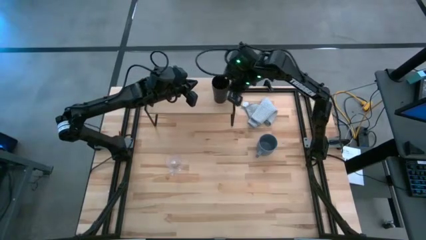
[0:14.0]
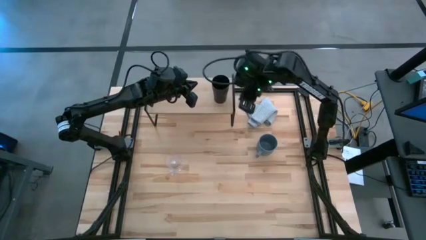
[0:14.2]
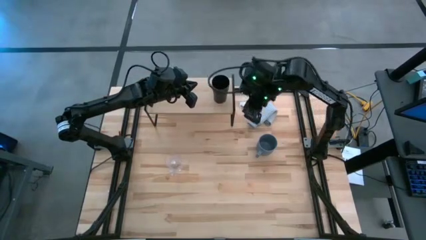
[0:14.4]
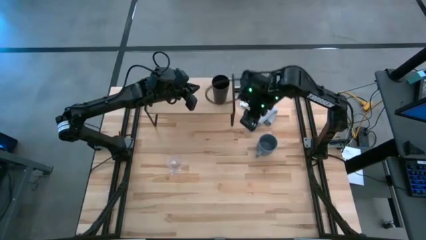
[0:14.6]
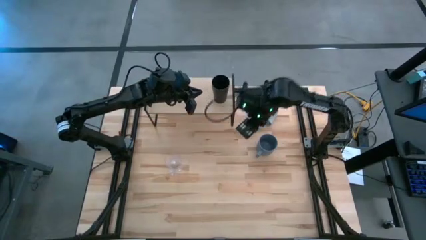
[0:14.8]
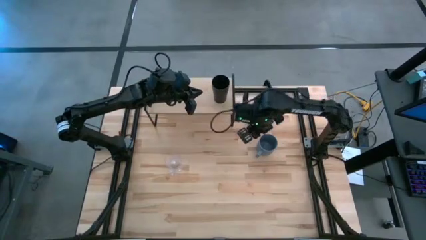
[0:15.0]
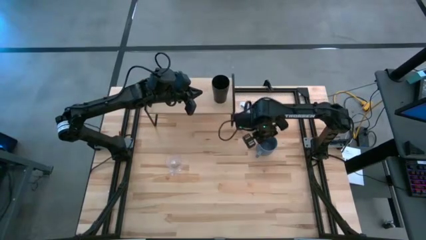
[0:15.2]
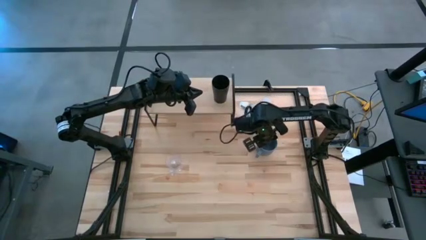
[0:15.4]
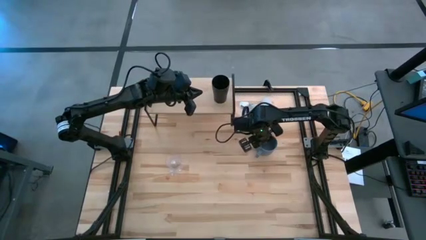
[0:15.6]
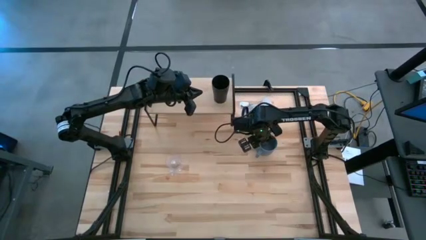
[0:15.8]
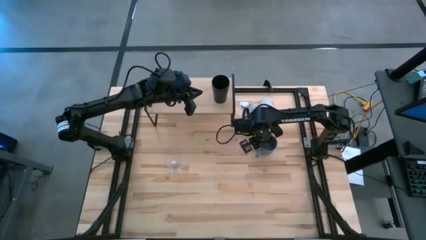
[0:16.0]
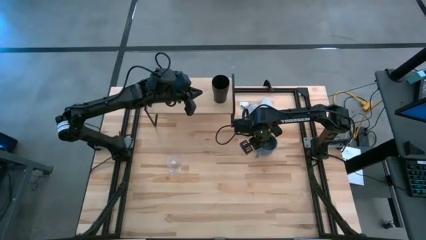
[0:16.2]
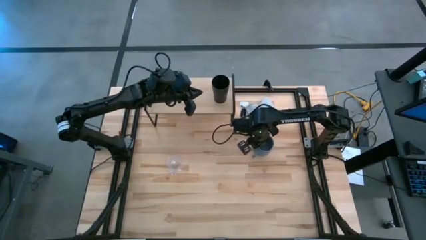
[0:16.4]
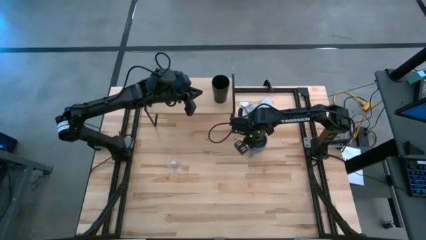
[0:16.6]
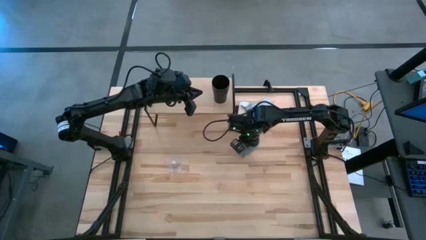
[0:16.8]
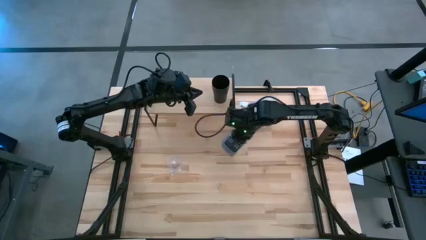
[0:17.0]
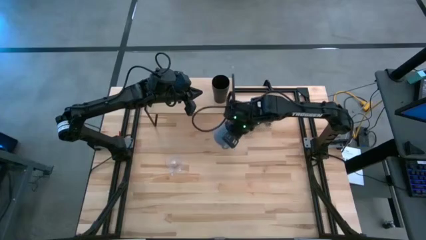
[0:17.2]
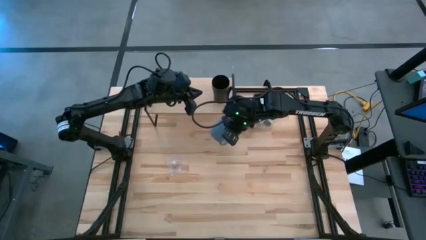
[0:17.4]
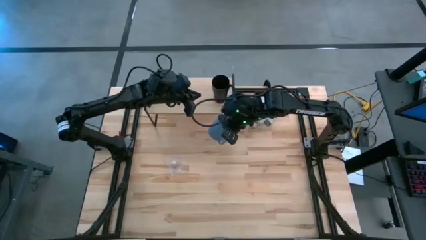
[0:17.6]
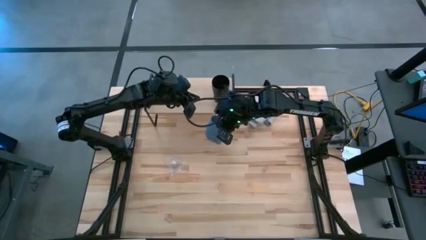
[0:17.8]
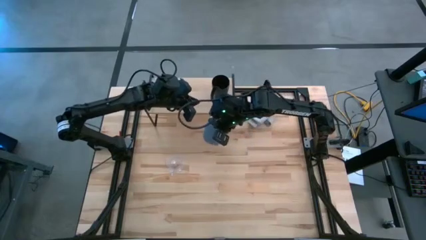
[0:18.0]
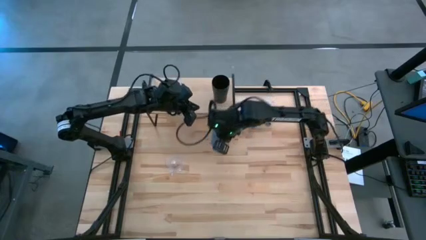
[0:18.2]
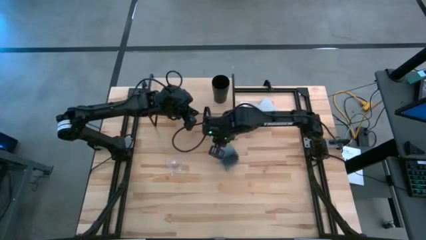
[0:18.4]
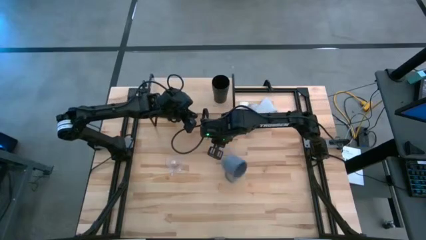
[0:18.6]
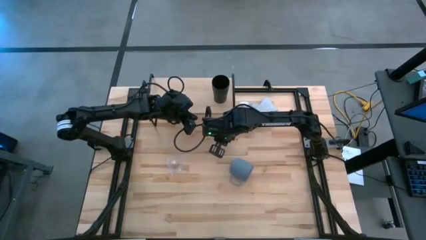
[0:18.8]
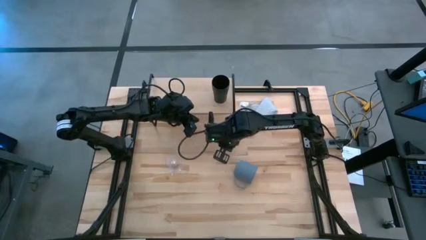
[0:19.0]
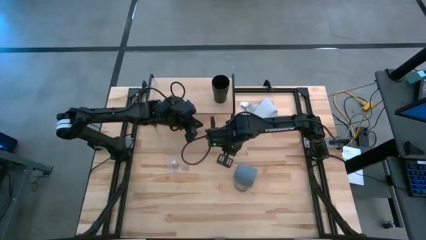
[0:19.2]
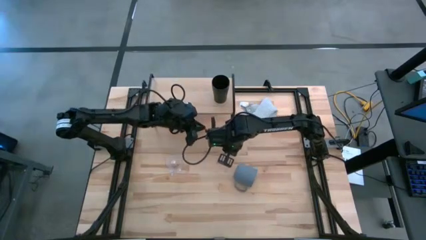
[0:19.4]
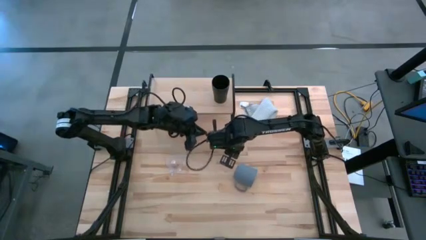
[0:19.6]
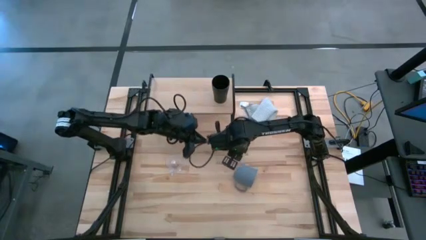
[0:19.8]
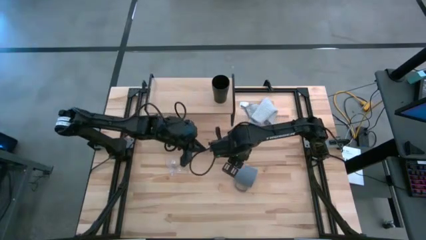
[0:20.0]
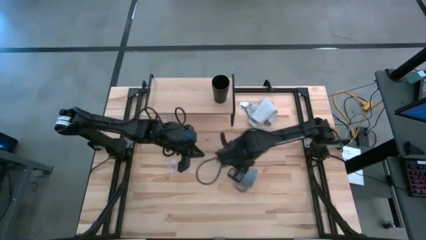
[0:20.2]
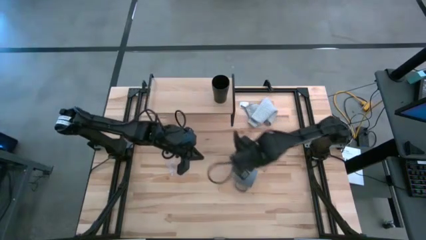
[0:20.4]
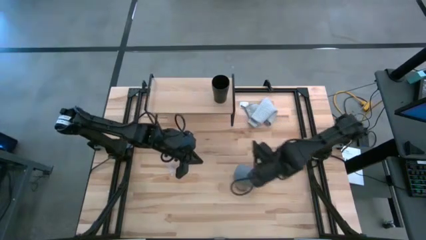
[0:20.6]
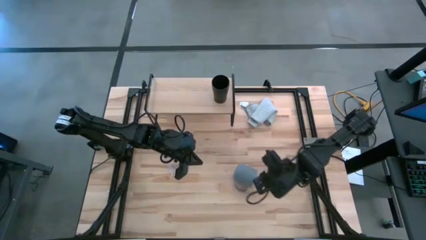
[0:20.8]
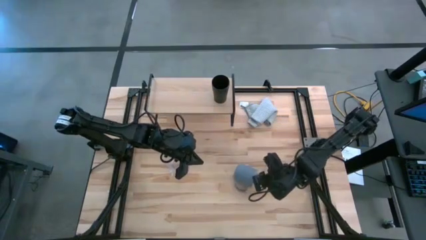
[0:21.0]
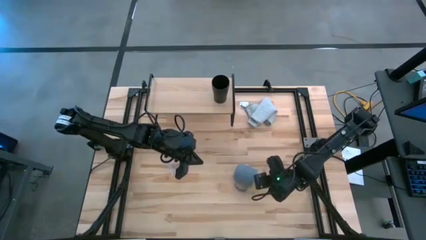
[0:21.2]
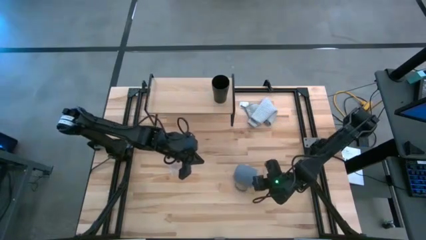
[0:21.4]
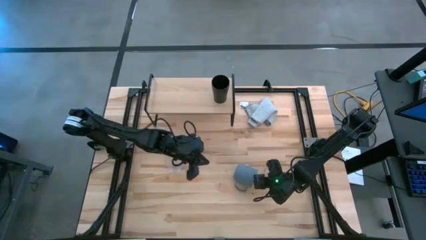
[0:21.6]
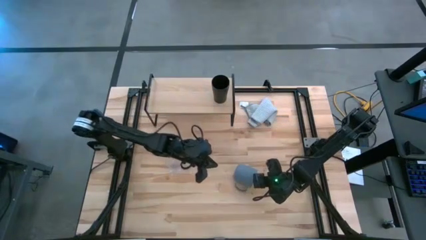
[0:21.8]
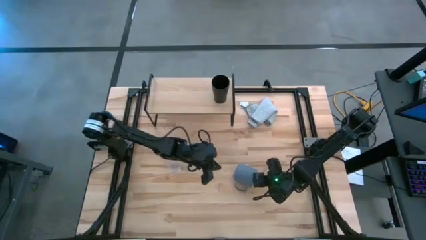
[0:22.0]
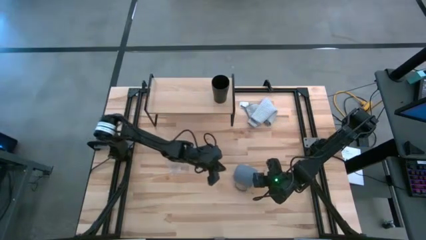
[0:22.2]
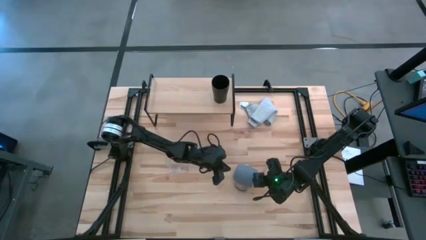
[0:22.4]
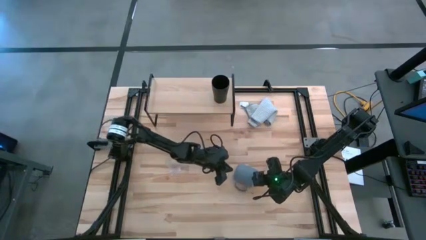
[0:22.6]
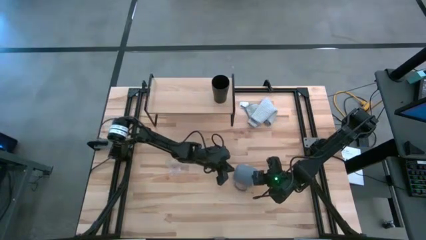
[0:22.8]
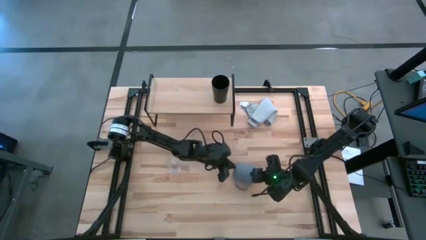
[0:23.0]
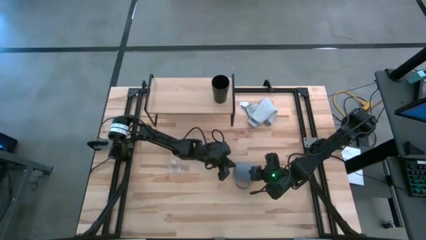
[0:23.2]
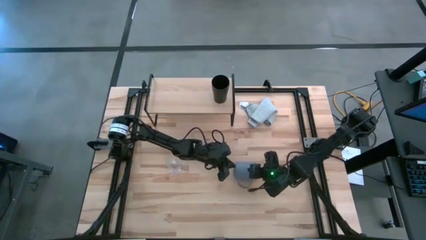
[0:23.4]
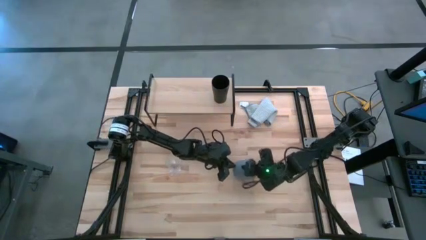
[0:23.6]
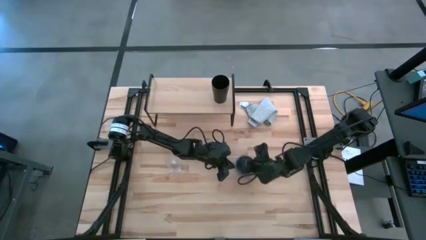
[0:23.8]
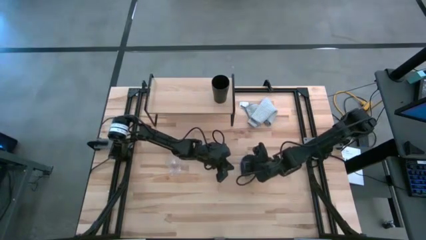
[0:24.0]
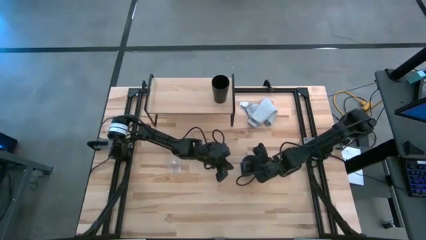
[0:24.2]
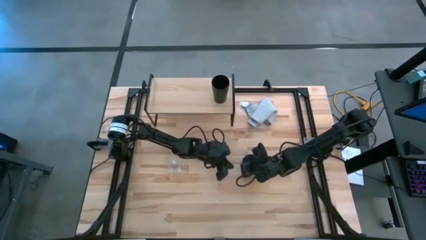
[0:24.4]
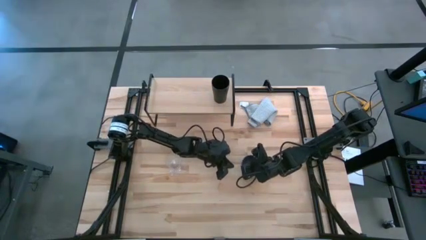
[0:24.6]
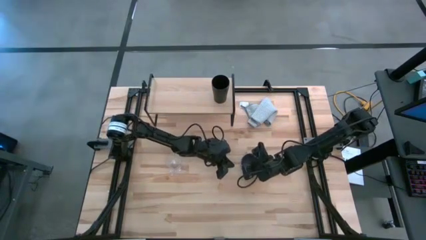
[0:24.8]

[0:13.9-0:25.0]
Task: Stack small to large cups/mugs on shelf
Put the blue mug on the shelf

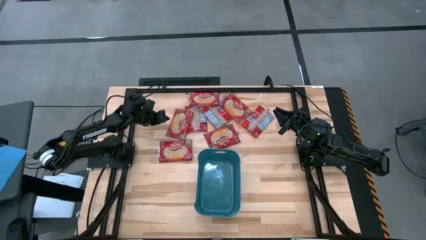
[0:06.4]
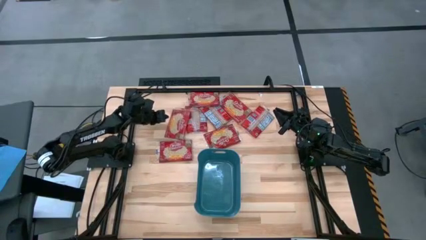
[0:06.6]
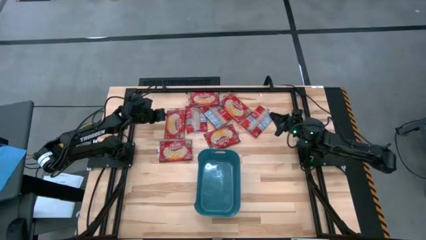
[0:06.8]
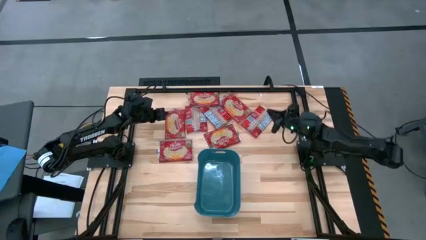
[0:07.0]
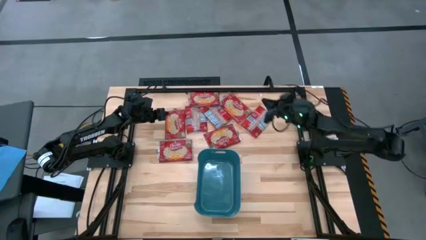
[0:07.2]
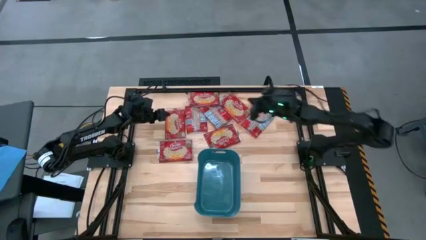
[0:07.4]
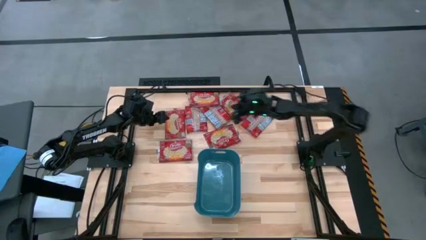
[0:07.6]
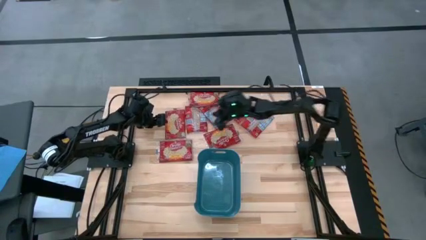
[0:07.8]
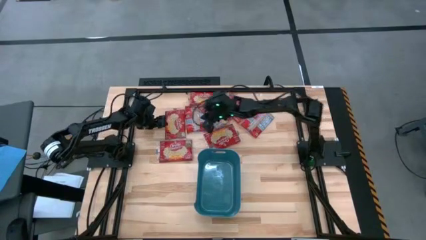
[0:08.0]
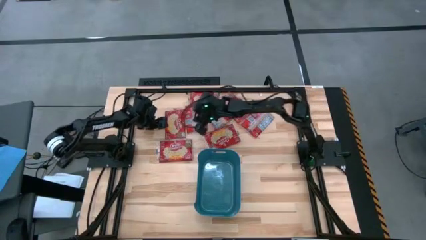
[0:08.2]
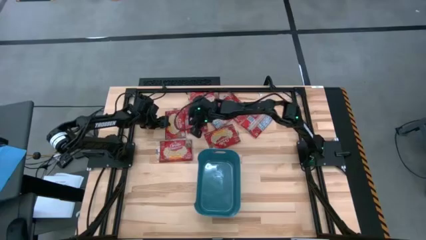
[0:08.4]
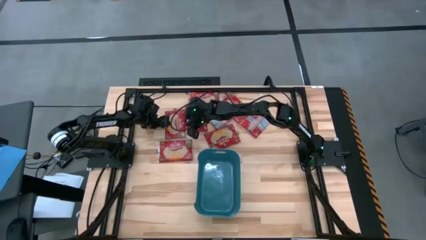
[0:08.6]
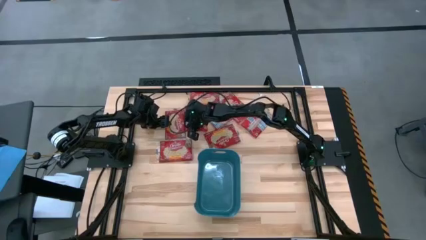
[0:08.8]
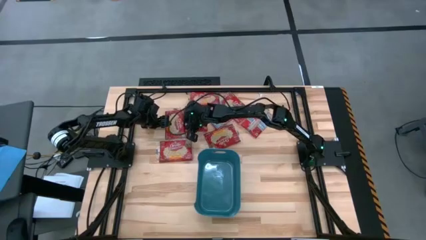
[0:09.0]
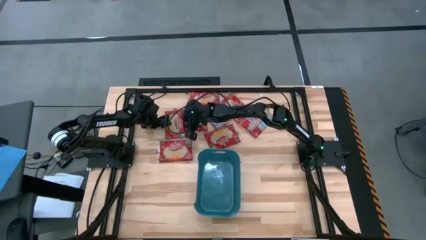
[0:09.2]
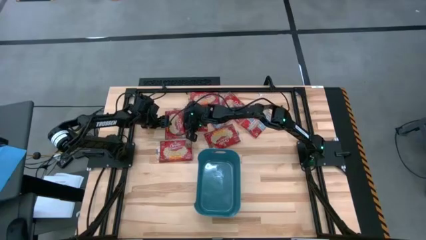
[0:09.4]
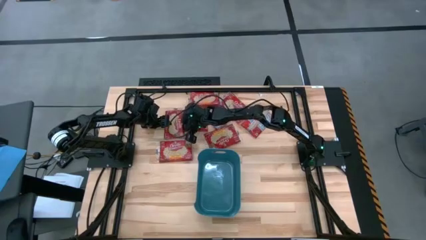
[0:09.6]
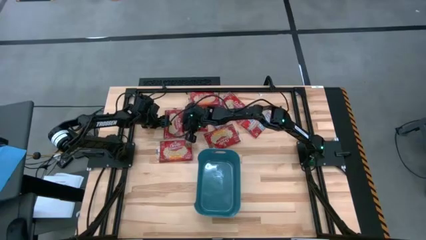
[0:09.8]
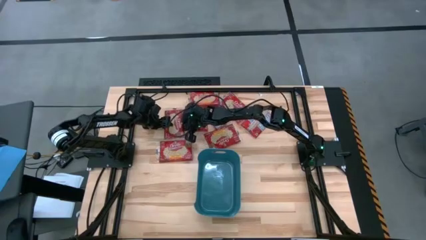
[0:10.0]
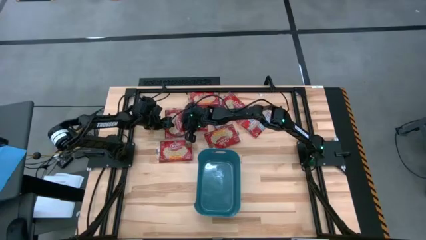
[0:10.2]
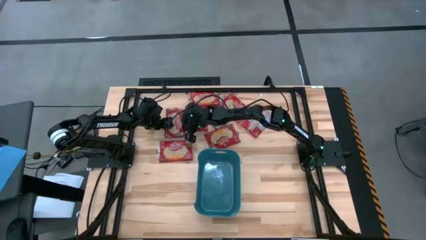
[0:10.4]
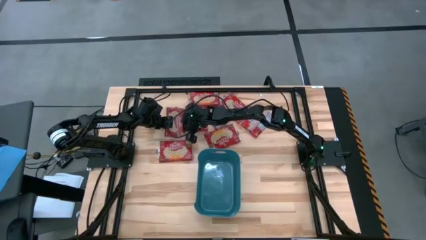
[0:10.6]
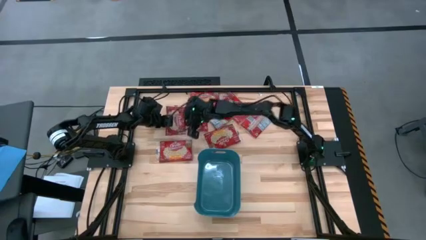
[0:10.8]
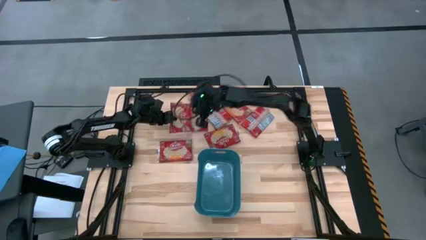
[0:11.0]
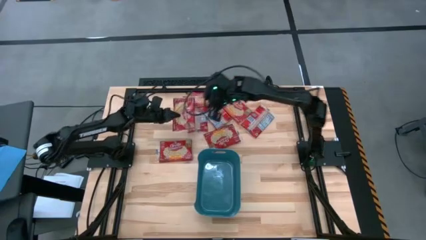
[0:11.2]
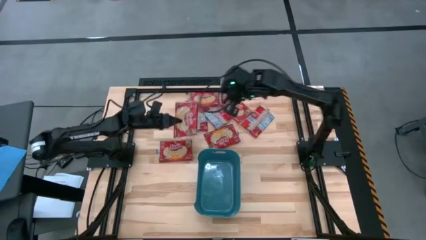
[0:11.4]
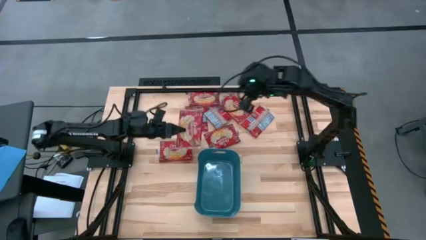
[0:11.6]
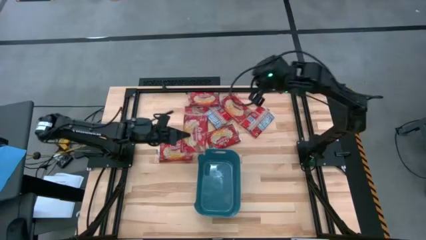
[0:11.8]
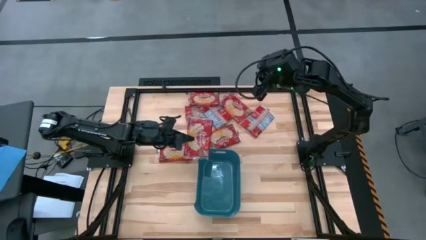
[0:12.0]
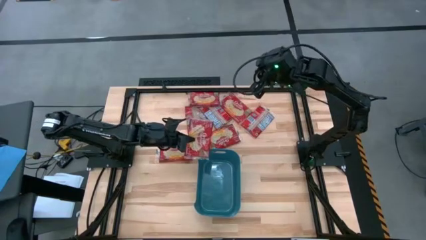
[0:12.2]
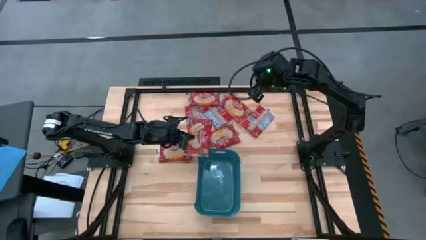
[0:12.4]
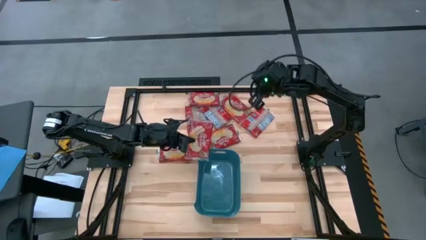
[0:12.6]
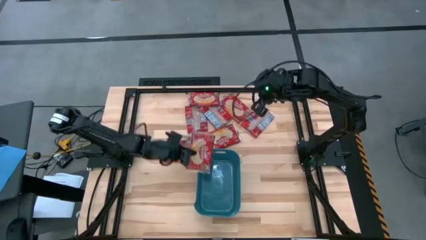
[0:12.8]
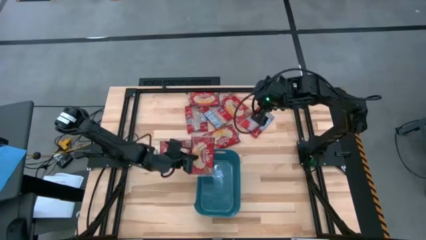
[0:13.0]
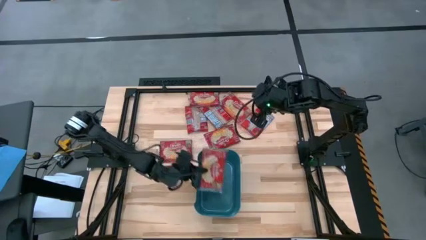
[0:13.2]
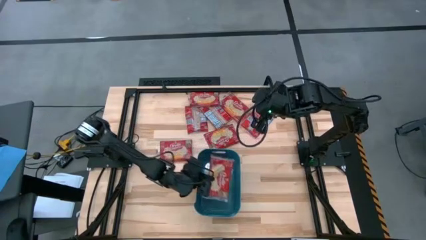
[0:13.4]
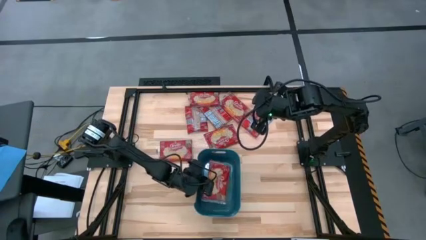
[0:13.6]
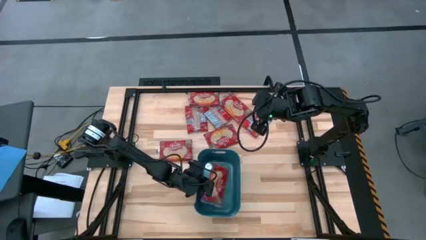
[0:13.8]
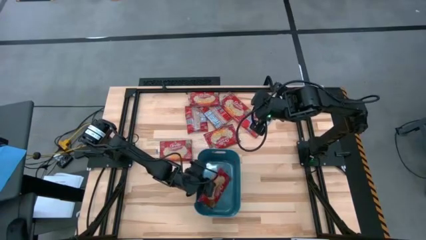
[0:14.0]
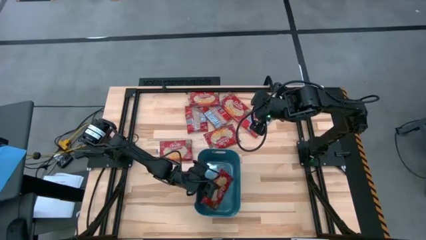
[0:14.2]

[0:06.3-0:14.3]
Task: Sort popcorn bags into baskets
Put the red popcorn pack into the blue container
